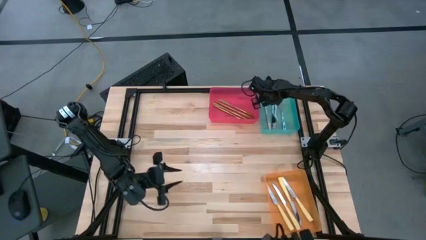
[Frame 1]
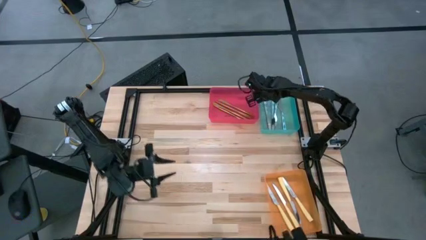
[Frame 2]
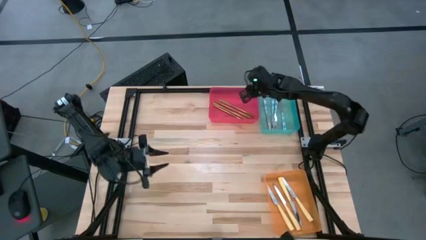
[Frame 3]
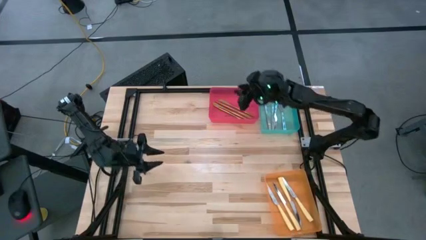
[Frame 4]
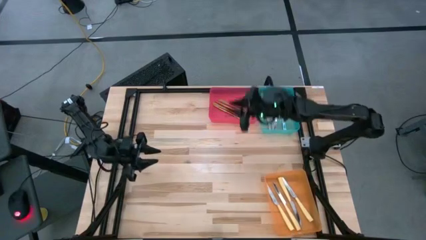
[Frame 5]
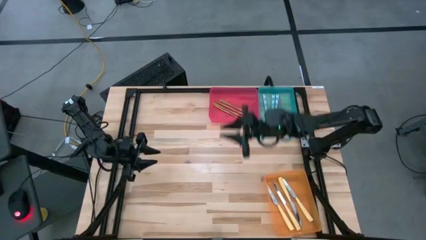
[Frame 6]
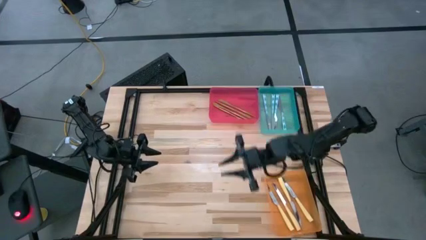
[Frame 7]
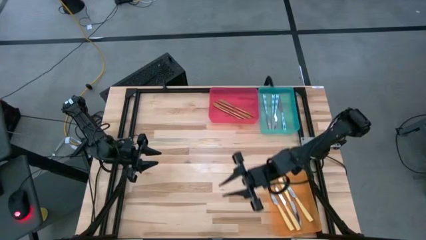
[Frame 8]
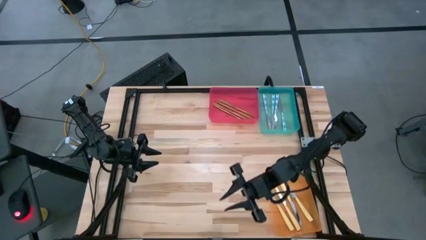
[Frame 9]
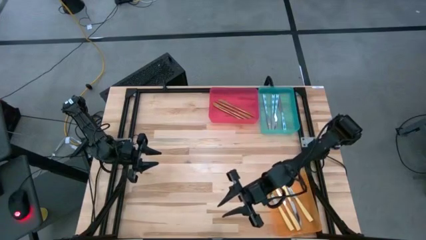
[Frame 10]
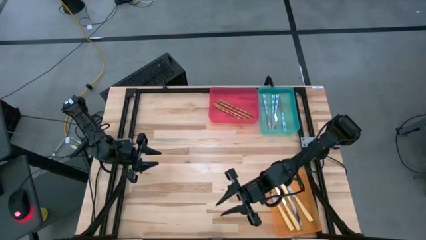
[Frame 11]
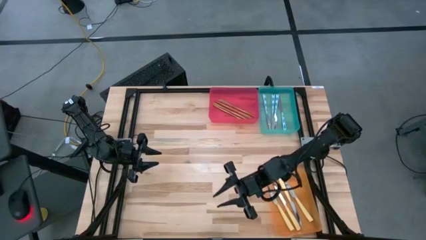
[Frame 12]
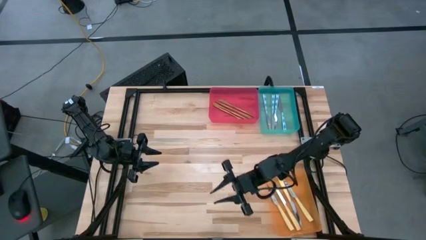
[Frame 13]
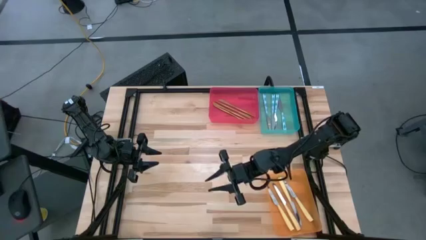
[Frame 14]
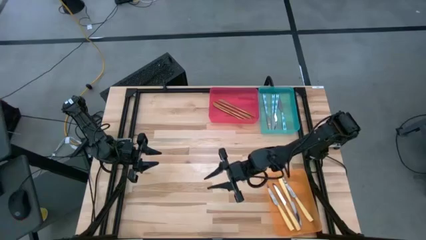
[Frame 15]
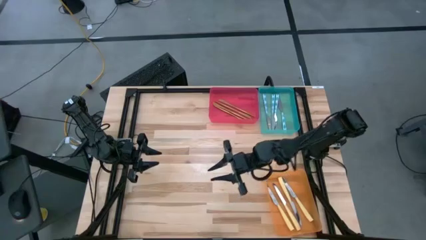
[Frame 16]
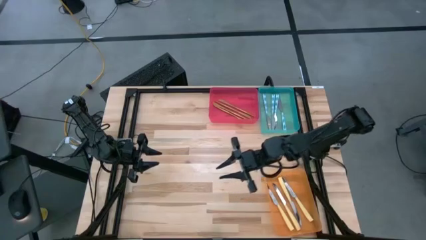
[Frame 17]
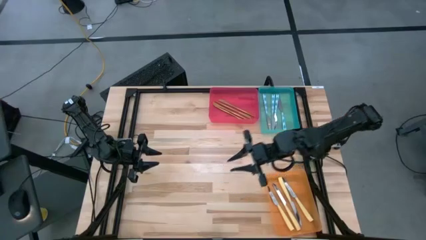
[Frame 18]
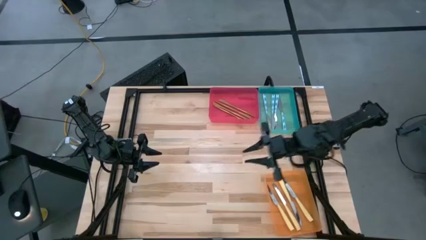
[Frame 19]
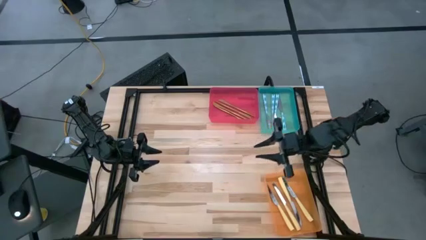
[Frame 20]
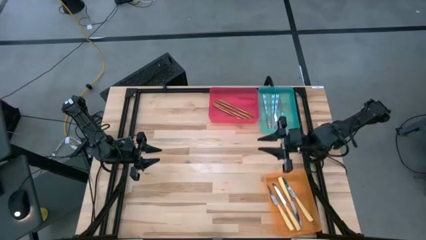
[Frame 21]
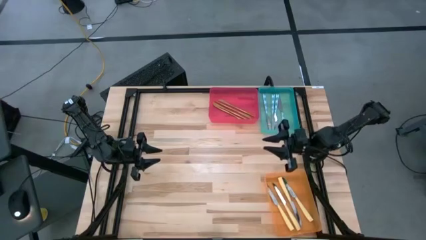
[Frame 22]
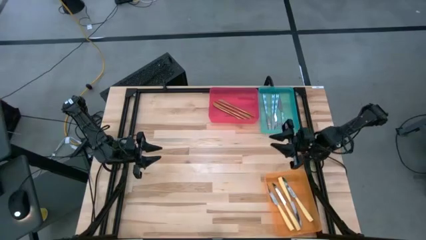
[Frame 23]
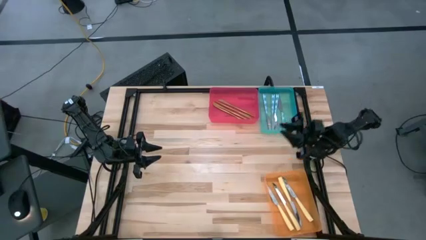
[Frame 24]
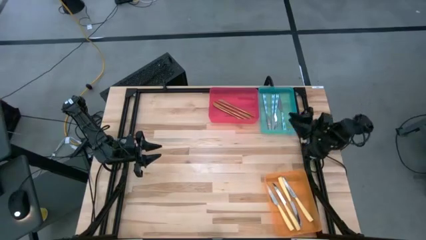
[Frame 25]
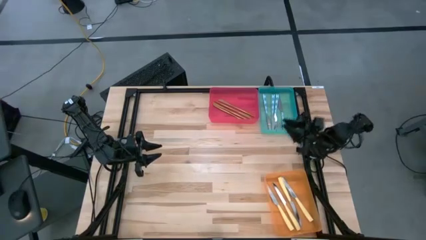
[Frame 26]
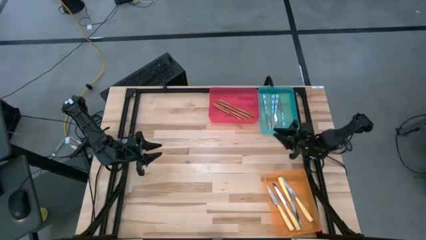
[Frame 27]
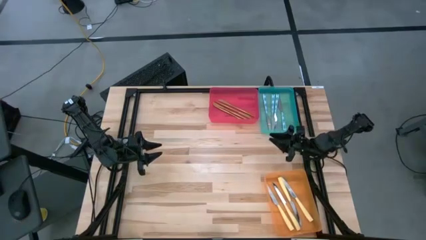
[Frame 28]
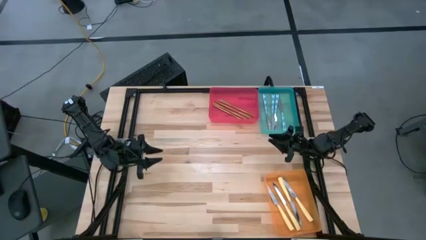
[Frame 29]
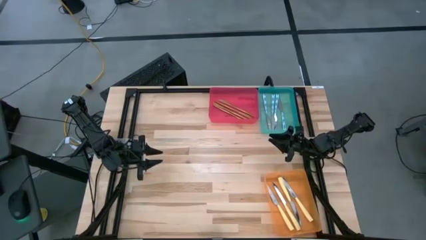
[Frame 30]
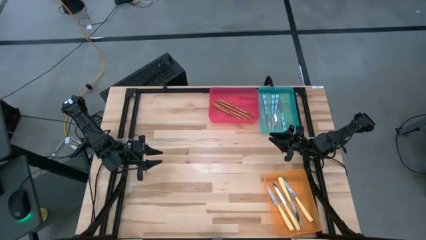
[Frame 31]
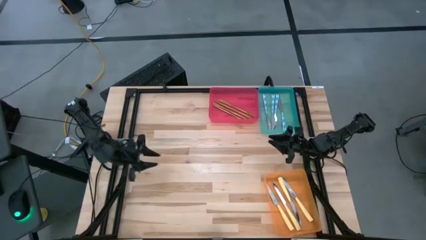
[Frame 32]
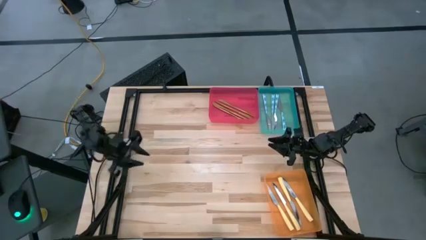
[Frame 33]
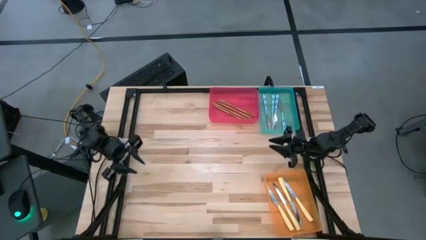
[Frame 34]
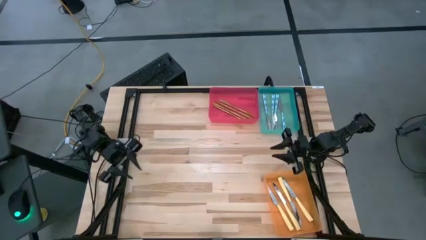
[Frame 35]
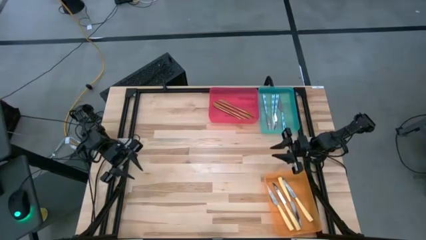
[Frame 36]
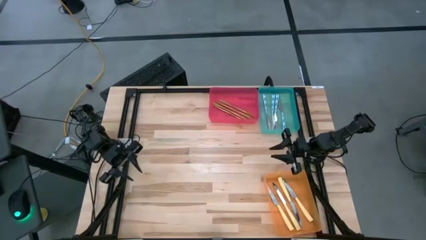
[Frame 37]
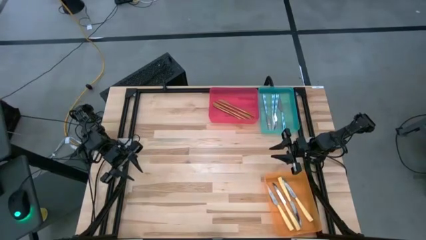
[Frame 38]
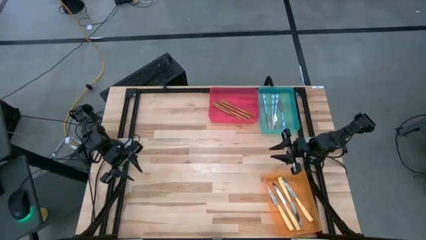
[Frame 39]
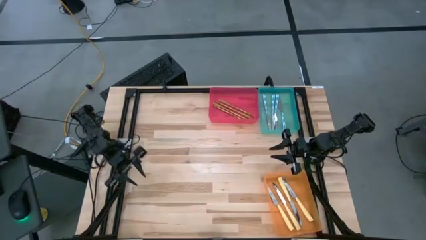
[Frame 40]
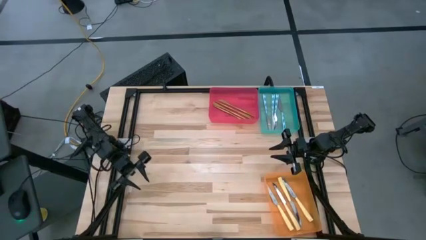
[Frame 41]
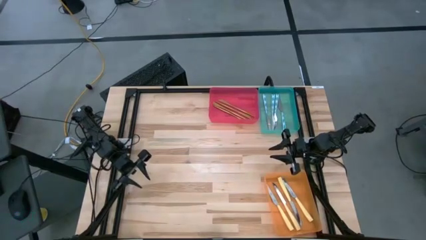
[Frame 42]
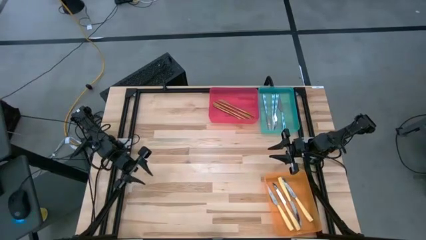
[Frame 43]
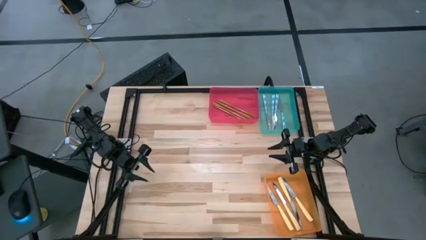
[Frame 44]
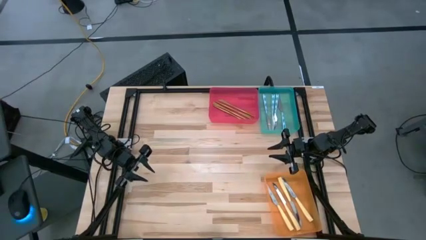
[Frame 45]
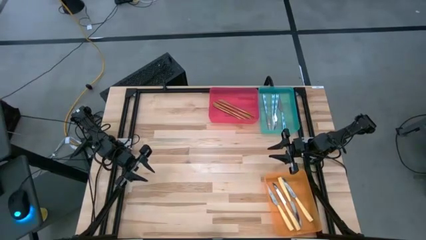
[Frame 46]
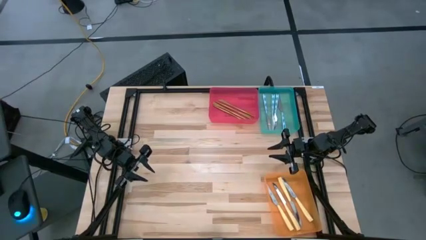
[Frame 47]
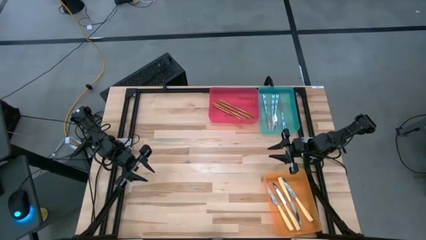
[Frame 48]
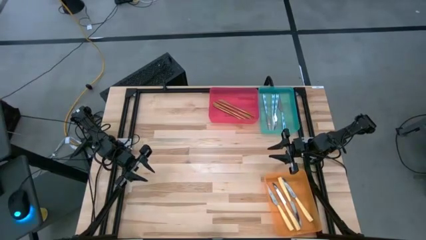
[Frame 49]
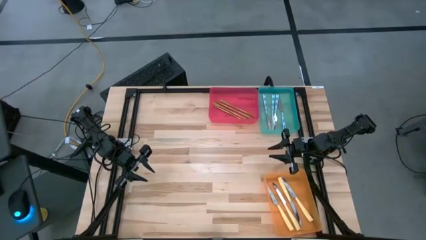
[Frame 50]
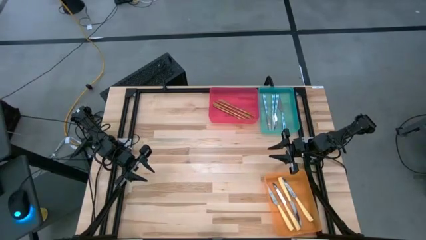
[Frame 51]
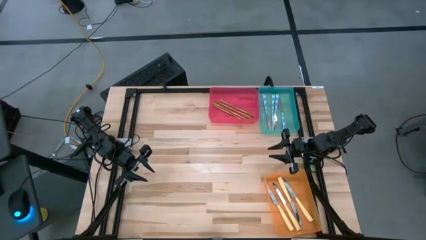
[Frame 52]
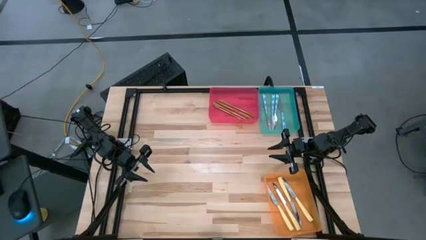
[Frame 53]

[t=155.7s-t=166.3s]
Task: Sort silverware by color (type)
Return to Home Position

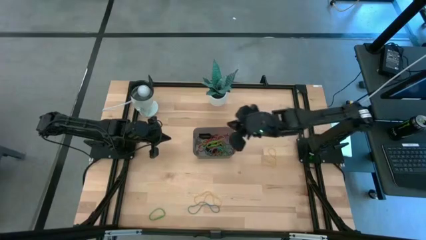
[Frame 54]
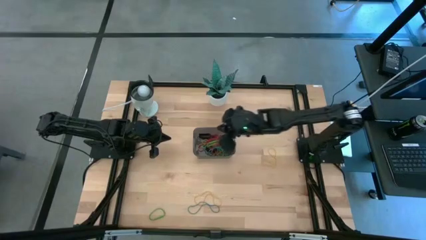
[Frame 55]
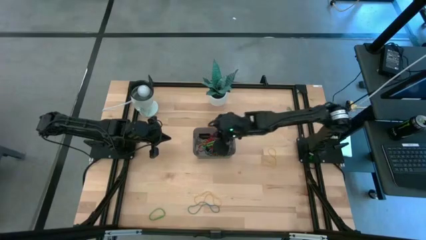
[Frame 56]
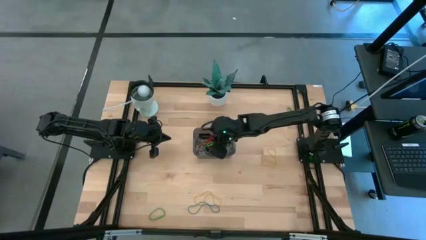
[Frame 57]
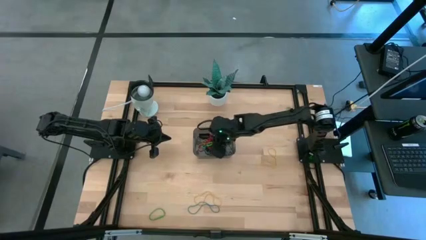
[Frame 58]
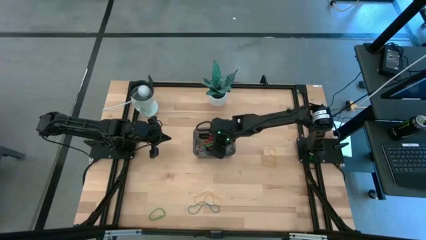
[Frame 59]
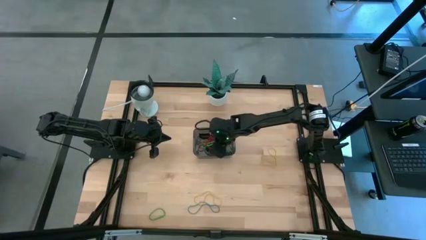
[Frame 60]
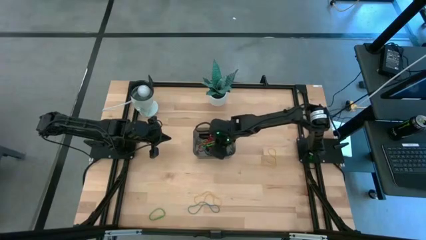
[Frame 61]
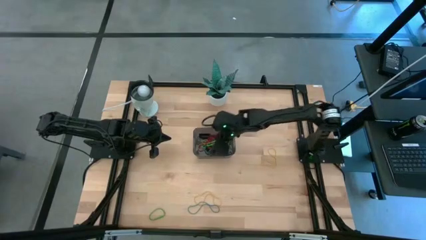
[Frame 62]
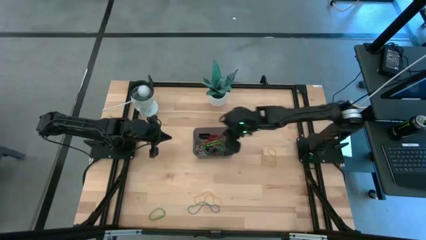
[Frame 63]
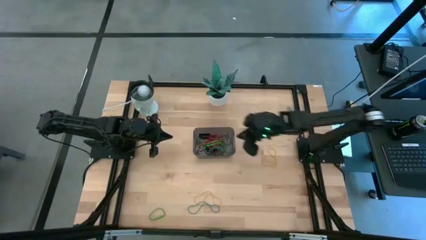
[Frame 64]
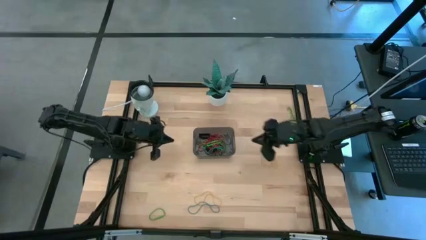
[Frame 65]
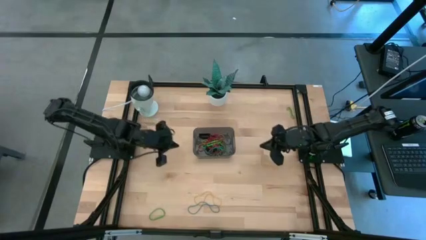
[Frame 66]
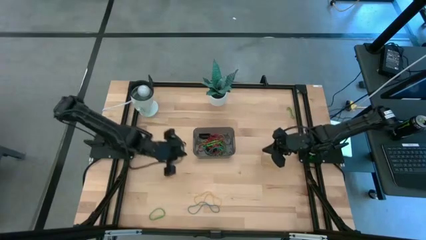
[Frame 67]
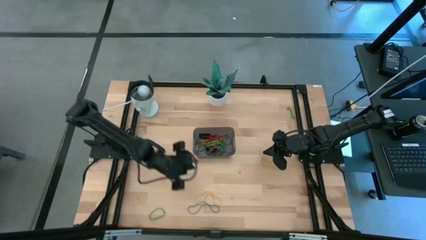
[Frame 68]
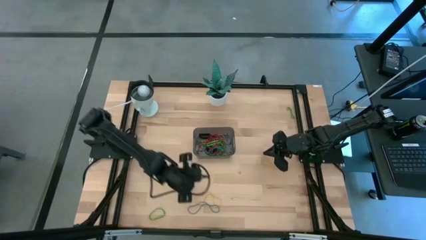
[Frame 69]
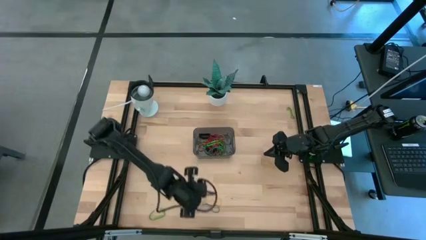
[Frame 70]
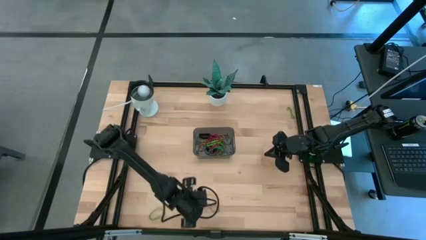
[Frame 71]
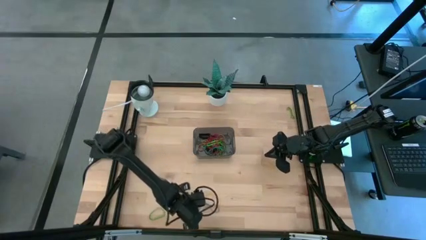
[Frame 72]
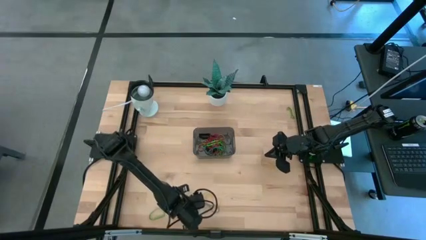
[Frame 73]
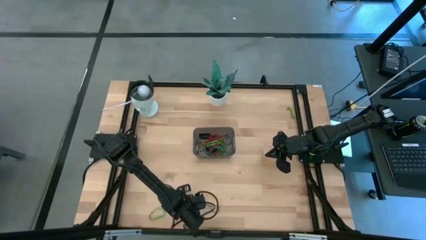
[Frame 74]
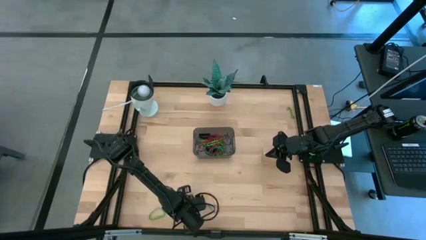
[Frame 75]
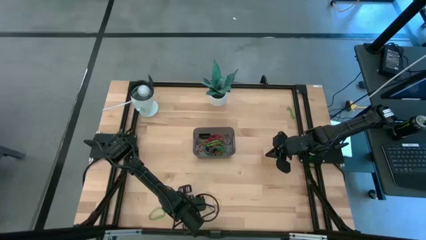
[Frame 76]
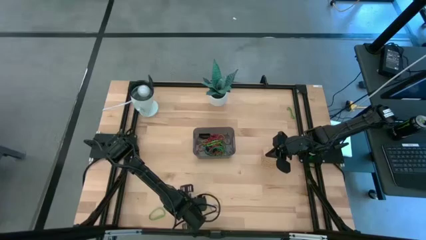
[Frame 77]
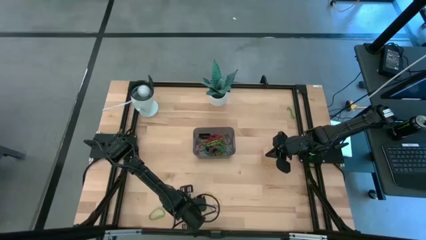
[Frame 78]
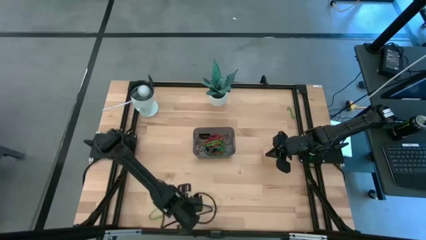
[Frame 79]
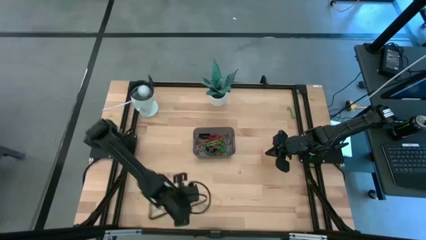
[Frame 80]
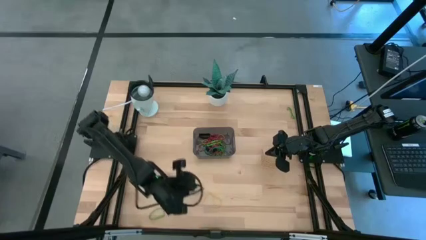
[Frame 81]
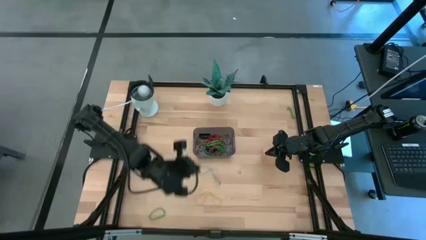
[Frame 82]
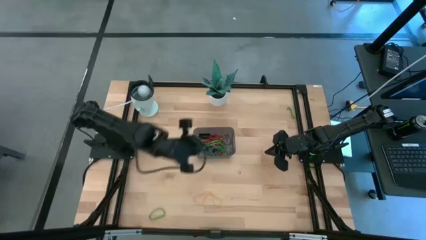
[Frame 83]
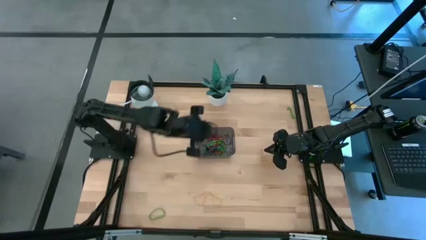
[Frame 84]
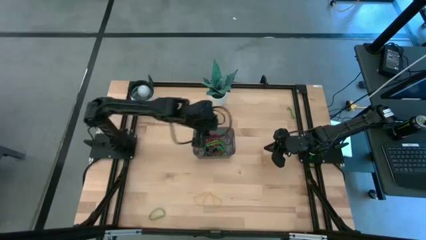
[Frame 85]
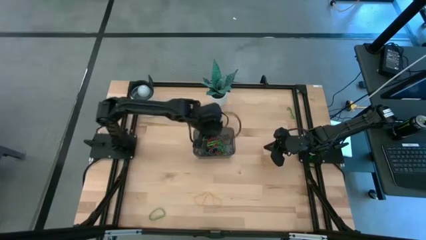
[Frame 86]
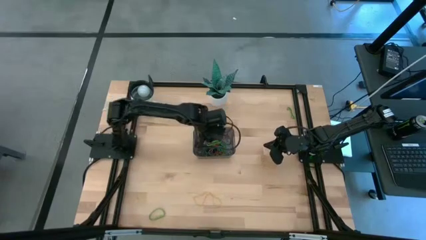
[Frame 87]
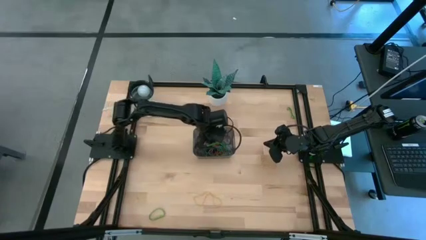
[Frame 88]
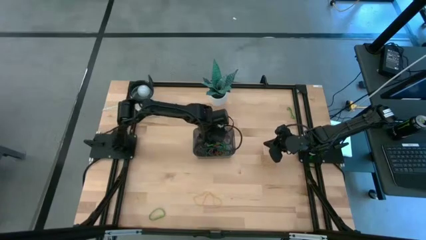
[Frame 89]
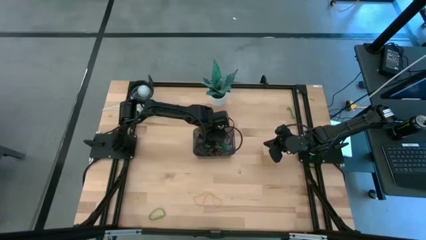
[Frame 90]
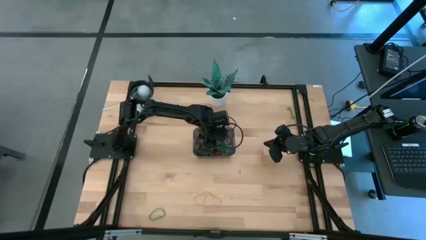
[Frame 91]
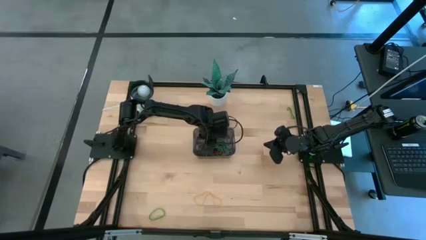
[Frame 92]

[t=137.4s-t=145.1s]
Task: Pick and place rubber bands into bin
Put the blue rubber band into the black bin
